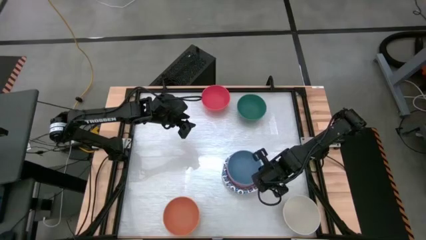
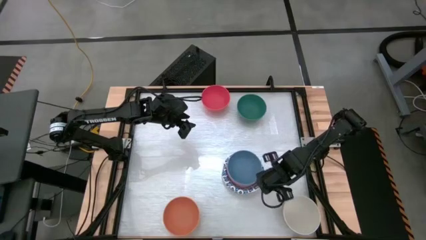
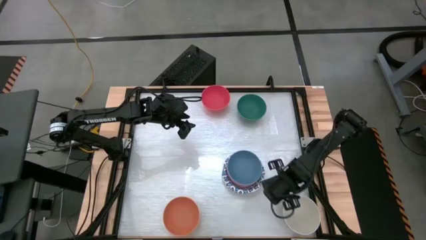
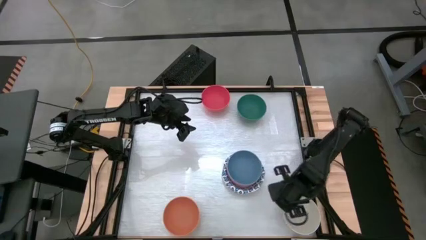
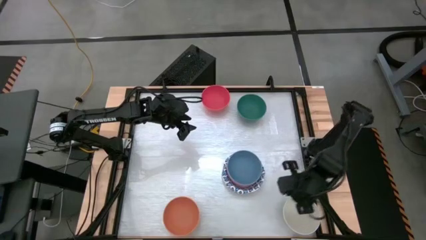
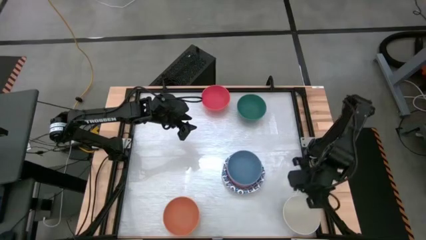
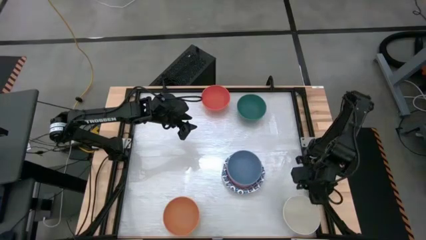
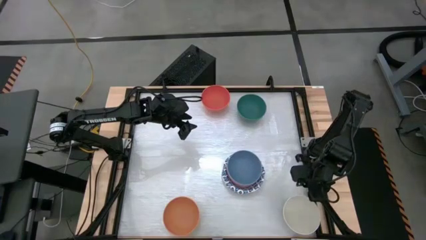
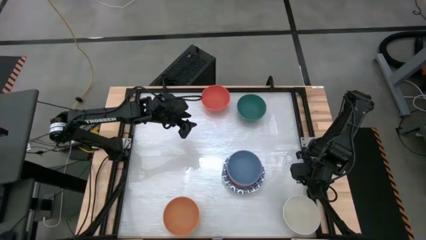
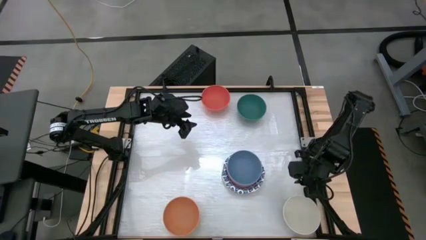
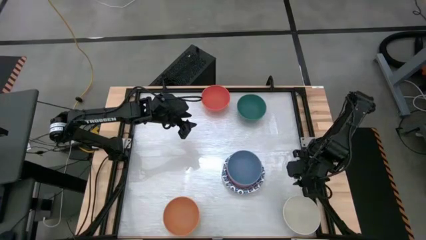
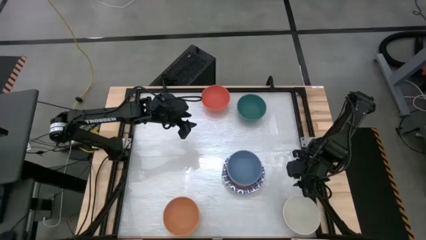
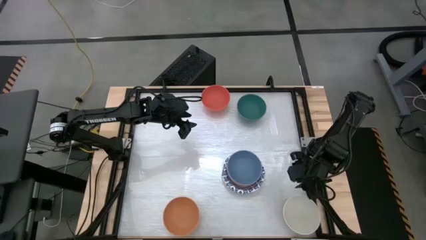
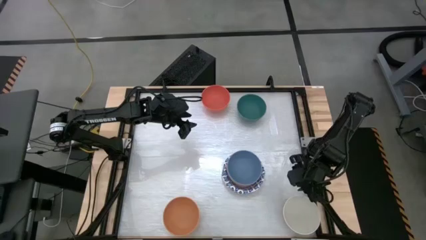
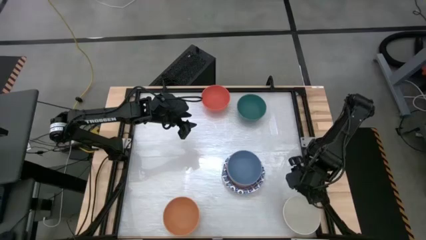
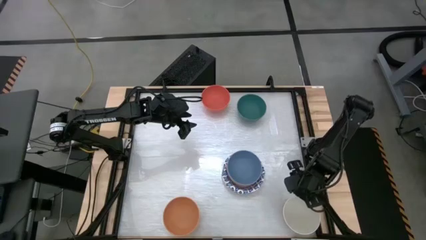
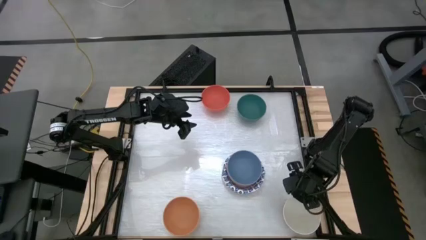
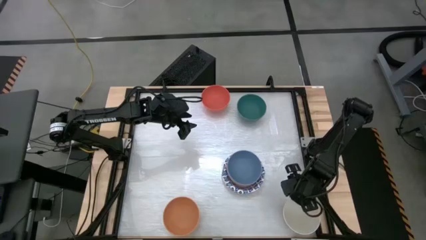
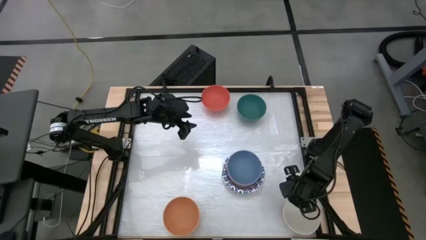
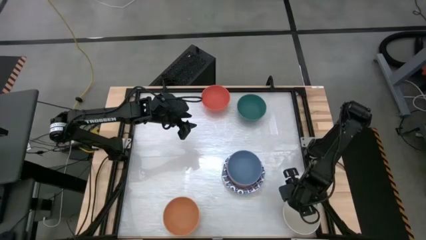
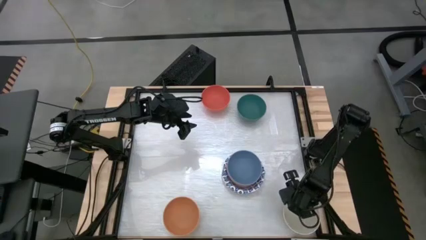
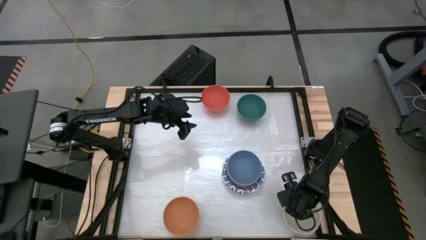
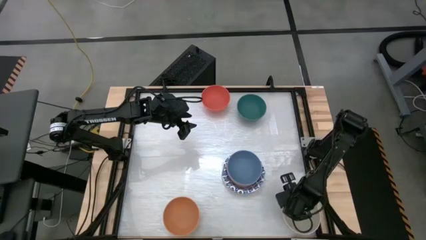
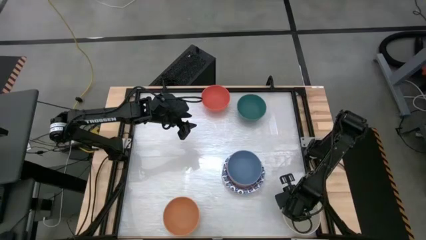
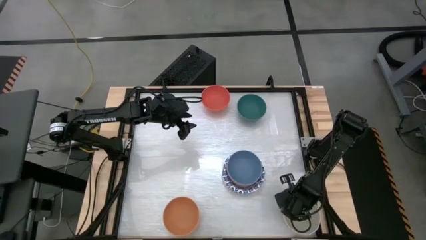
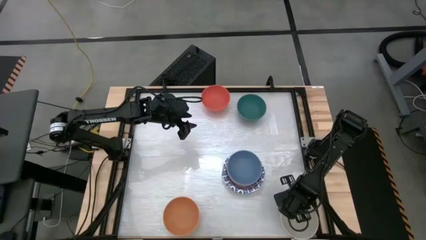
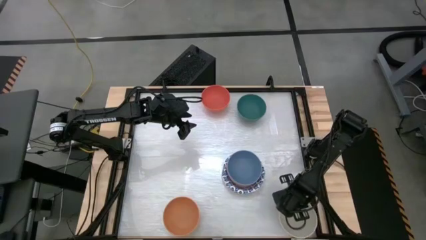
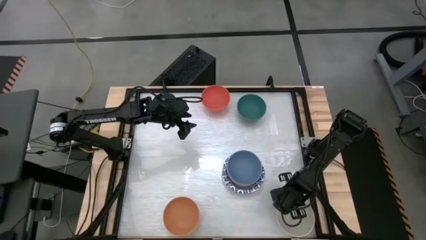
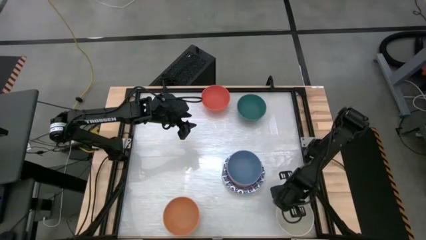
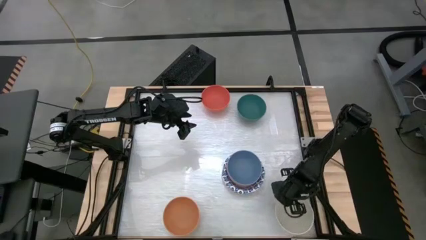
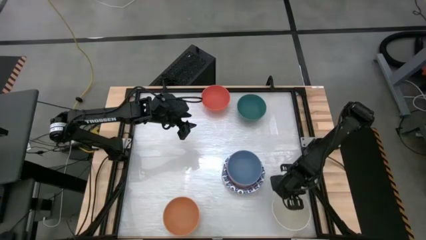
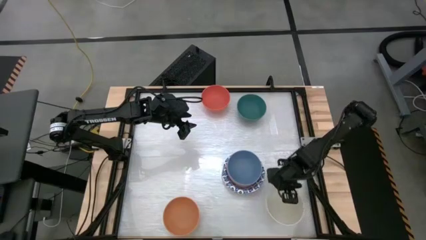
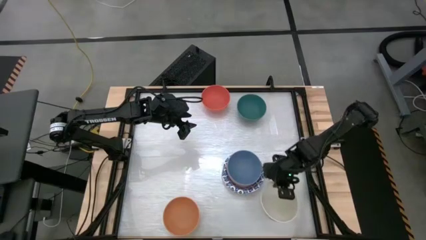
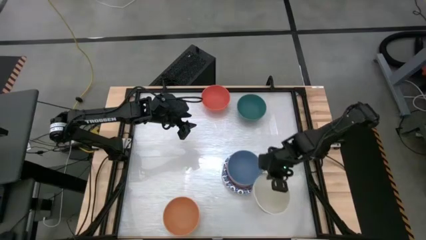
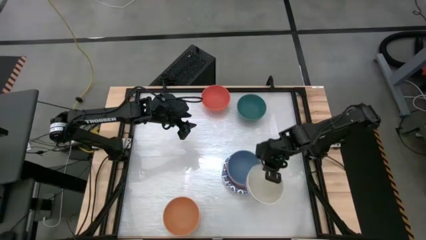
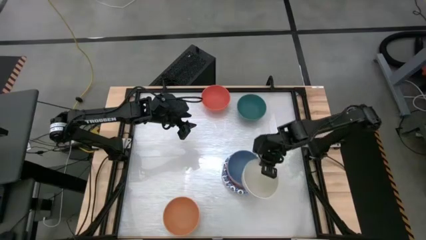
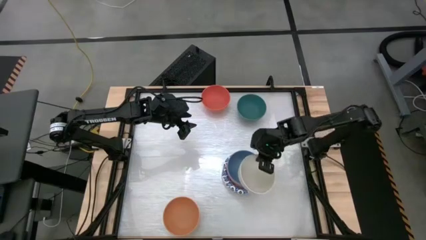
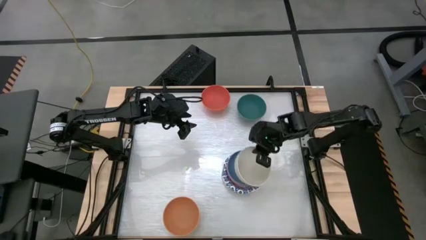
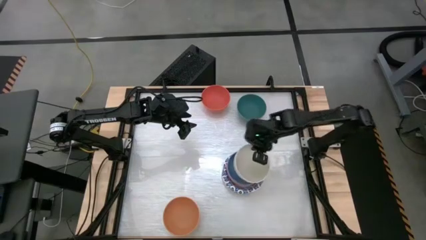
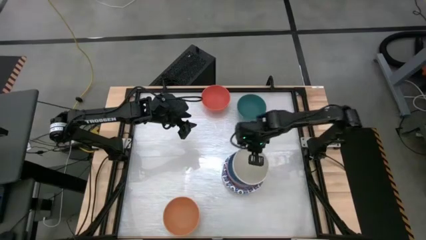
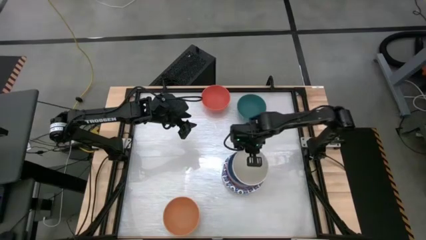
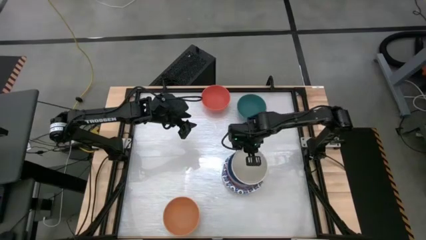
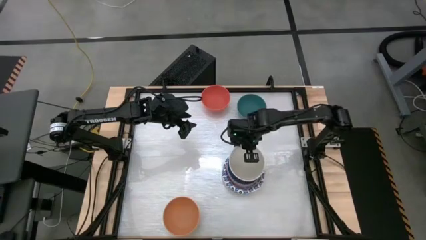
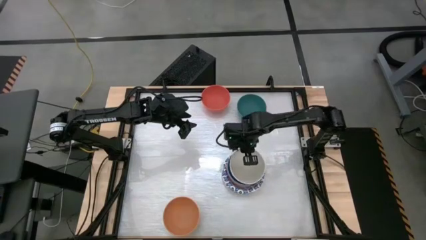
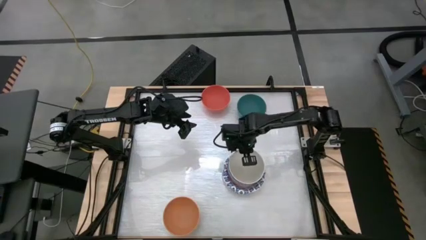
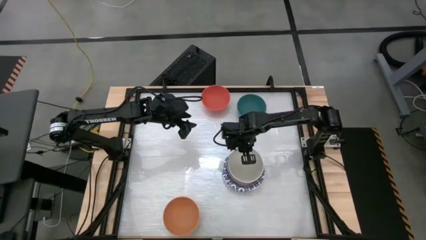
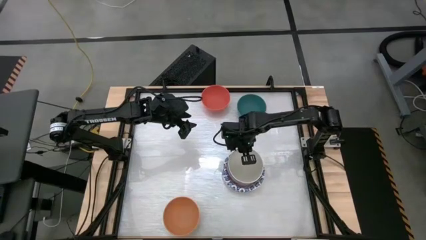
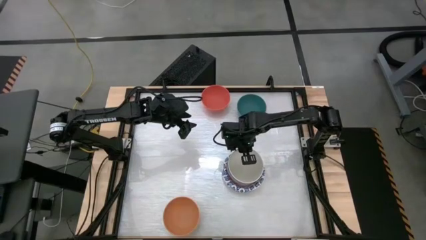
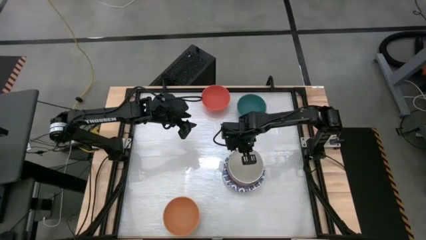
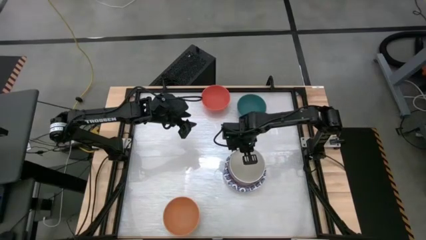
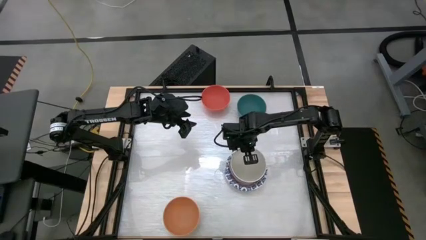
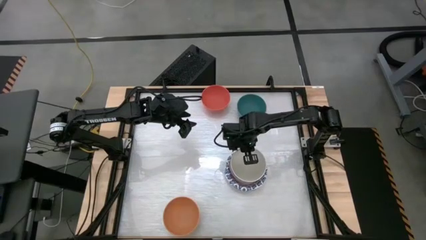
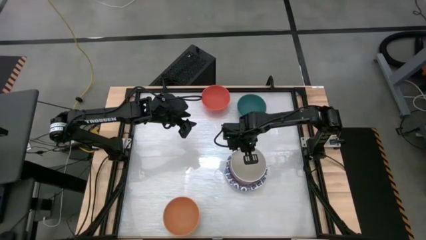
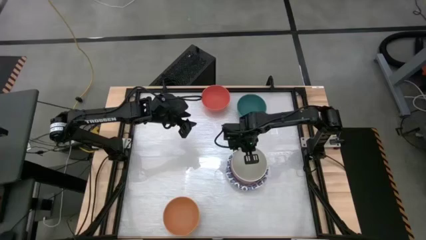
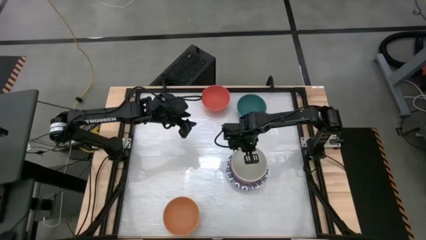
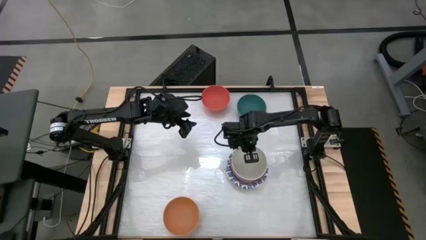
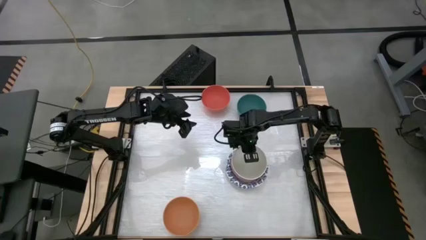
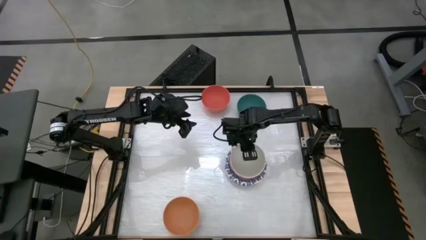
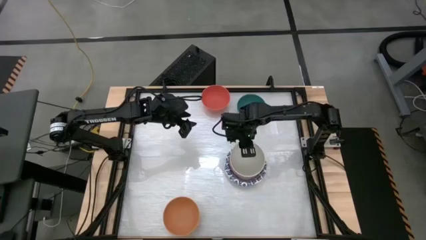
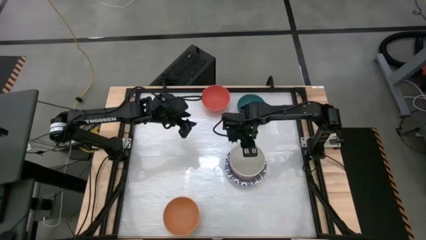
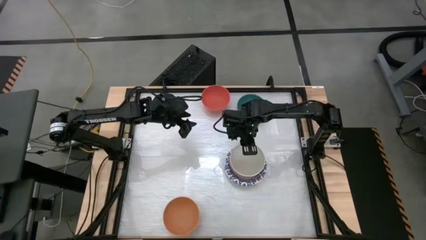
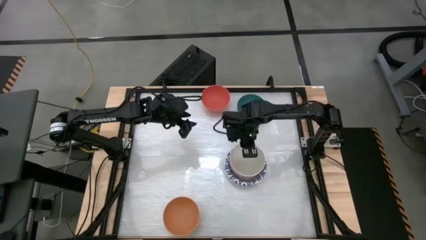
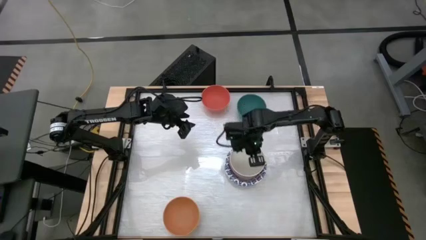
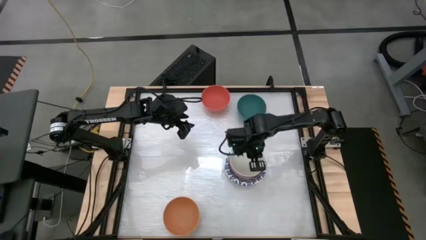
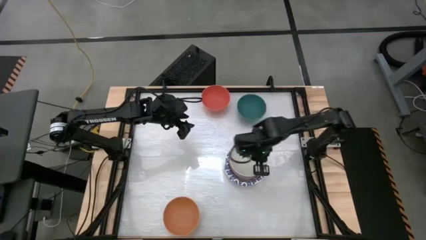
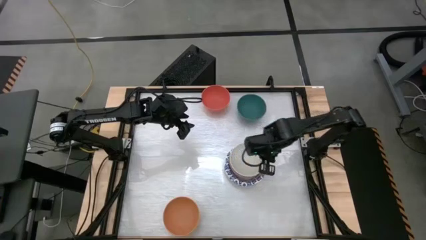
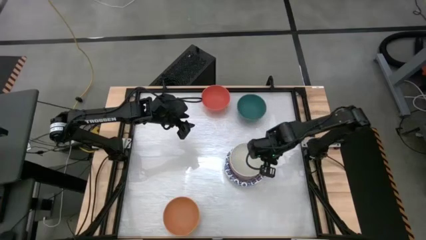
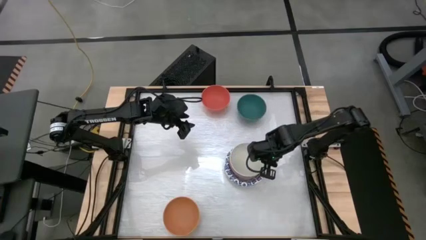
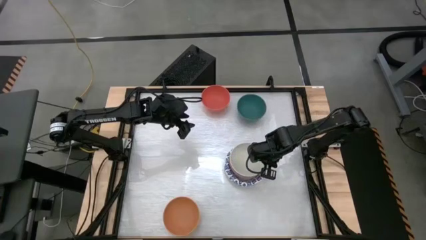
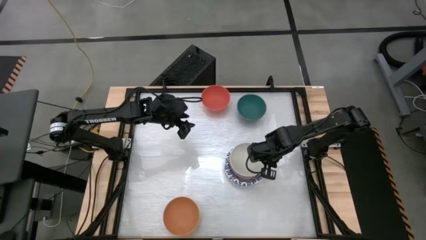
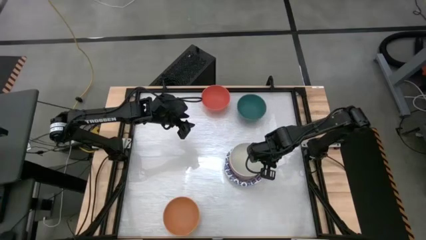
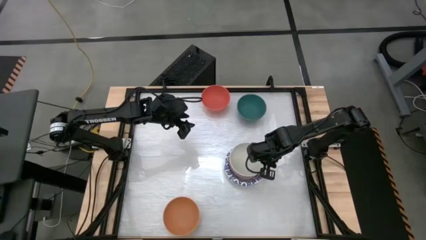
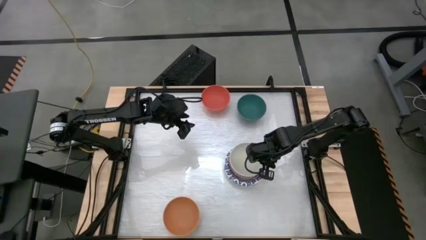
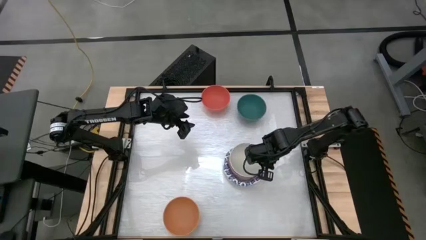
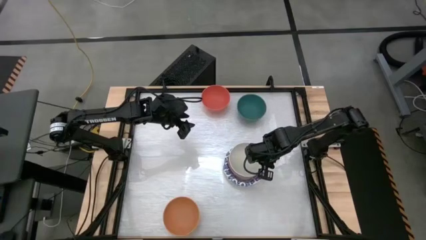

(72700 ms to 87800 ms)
Task: Nest bowls inside each other by size order
Stack the white bowl into the blue bowl

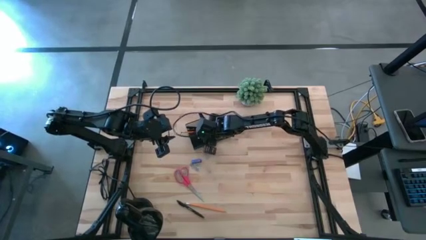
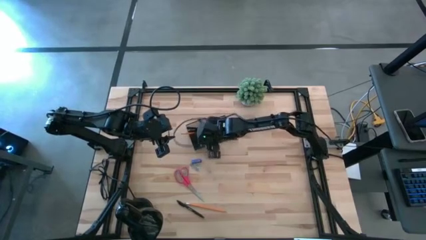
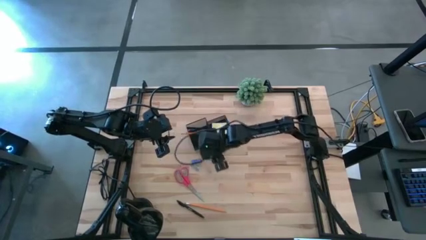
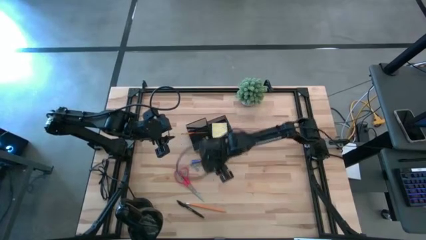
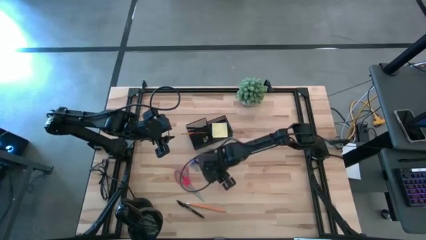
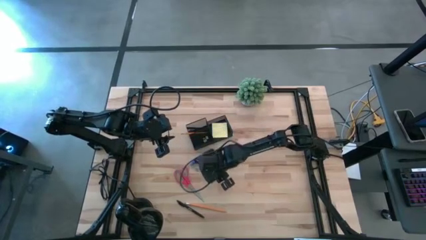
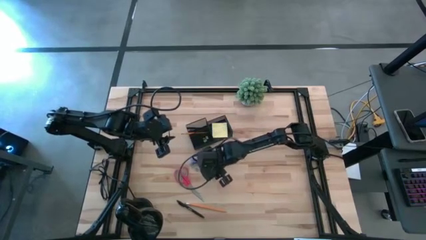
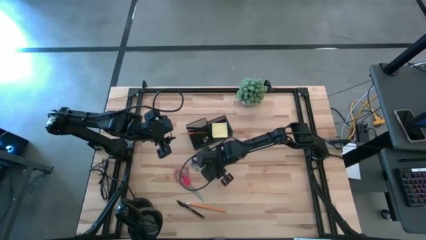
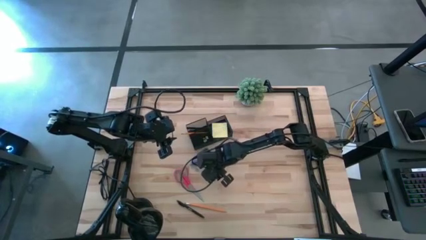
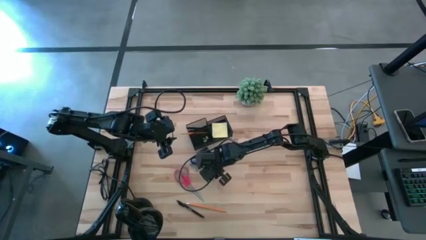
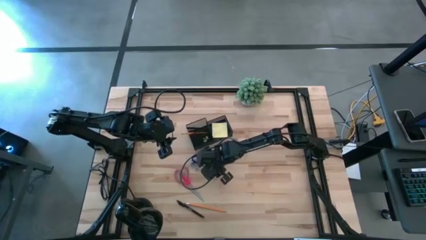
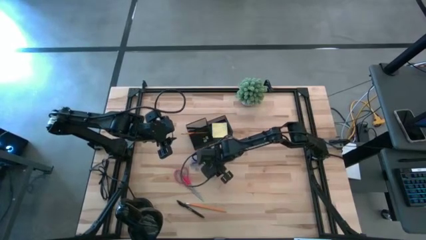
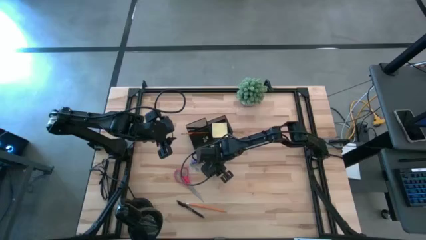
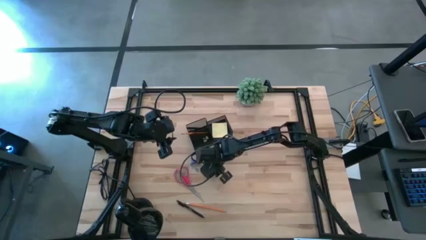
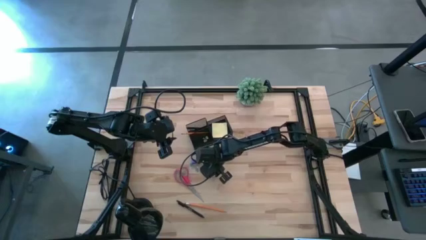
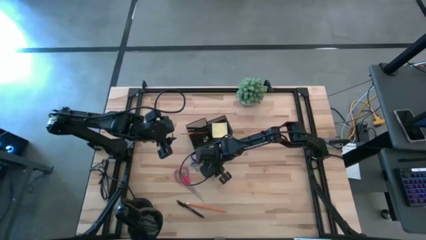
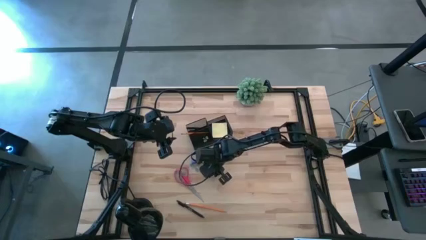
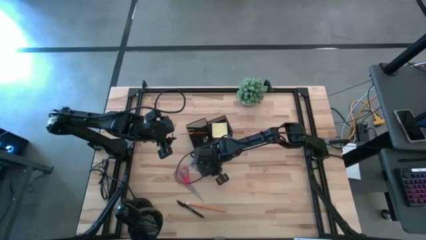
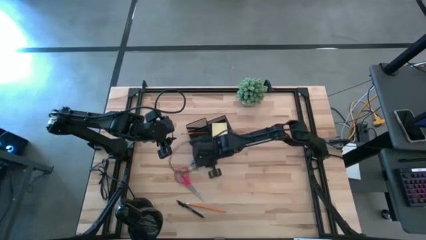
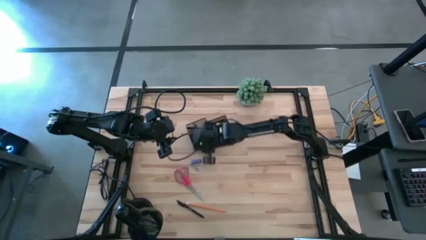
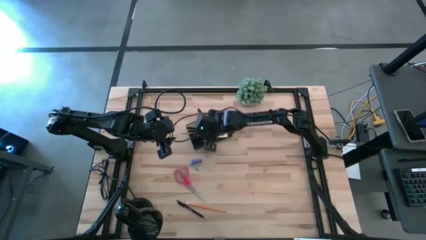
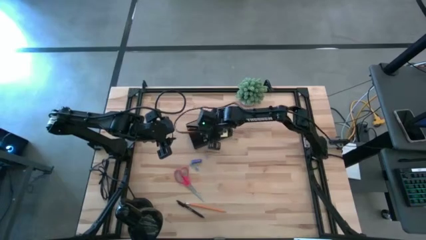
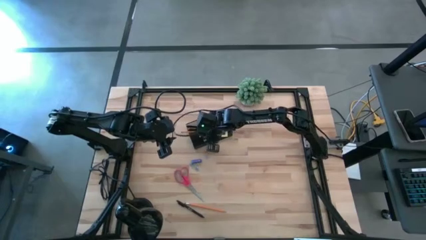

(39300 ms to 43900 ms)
Task: Pick and place office supplies into organizer
Put the pink binder clip into the desk organizer
